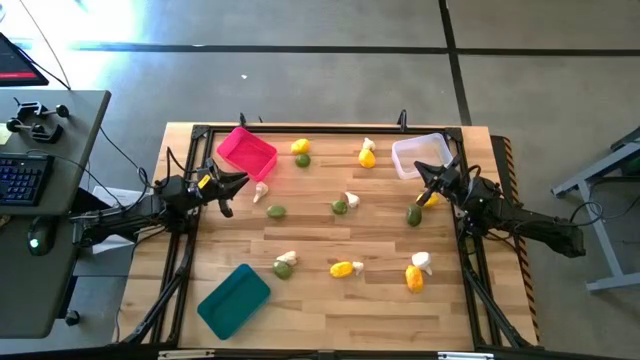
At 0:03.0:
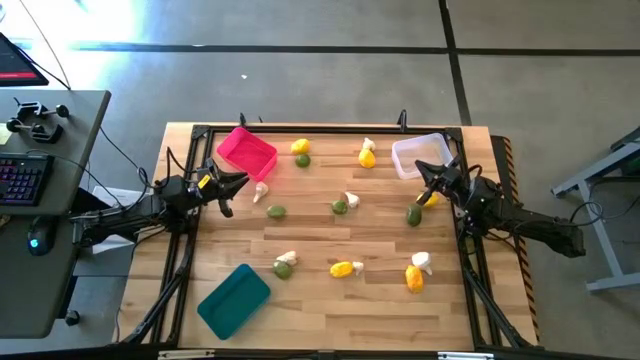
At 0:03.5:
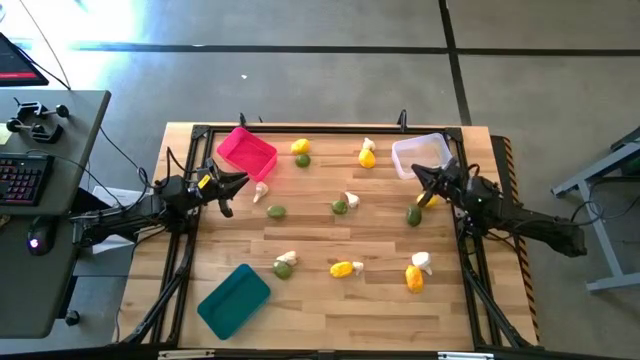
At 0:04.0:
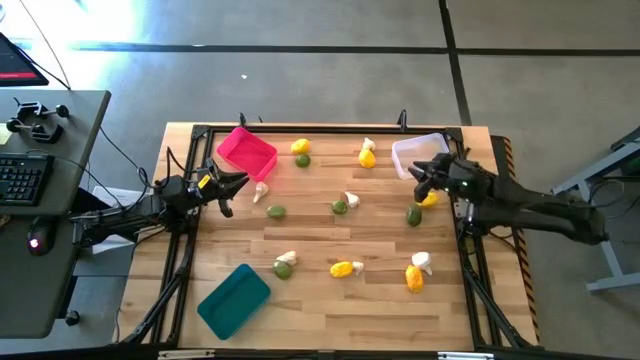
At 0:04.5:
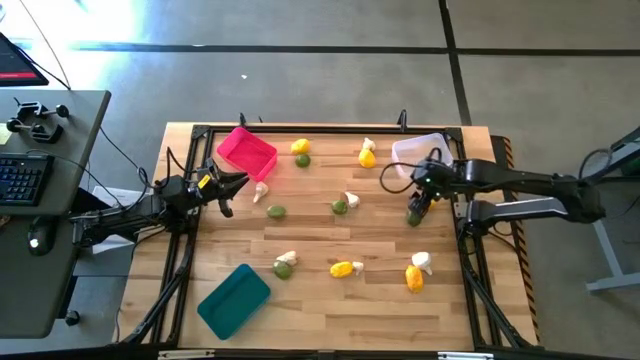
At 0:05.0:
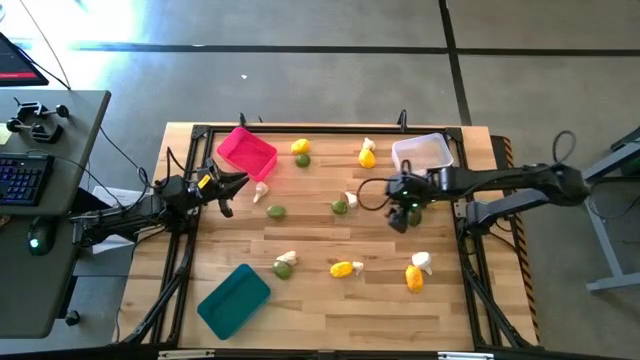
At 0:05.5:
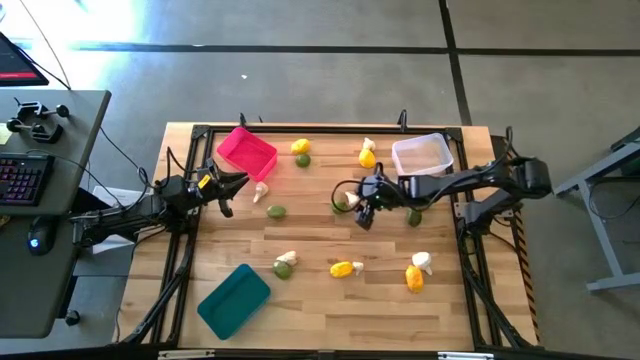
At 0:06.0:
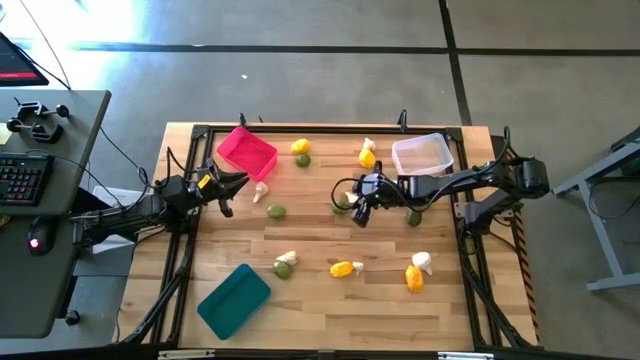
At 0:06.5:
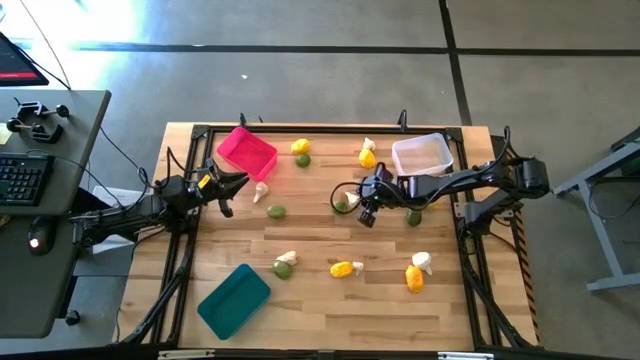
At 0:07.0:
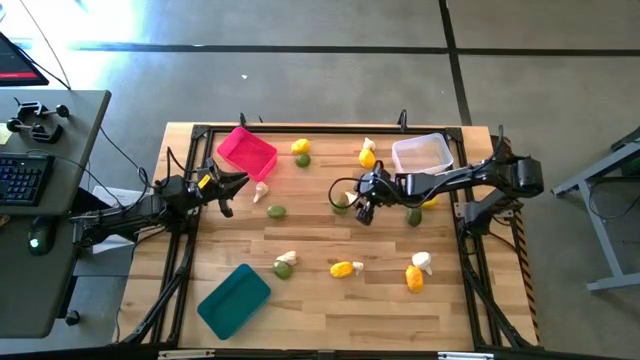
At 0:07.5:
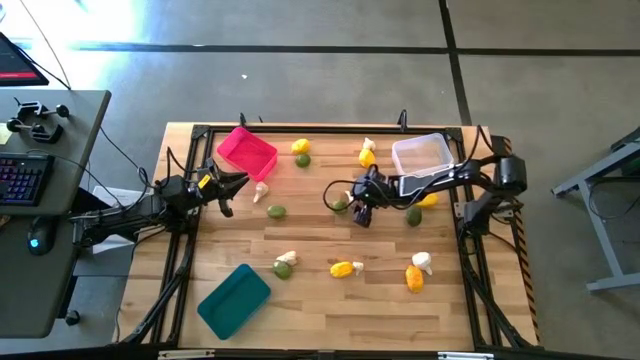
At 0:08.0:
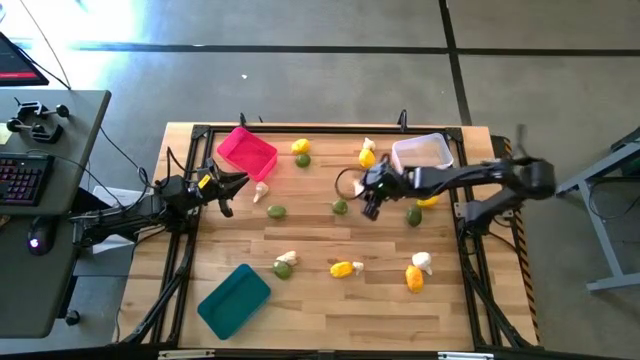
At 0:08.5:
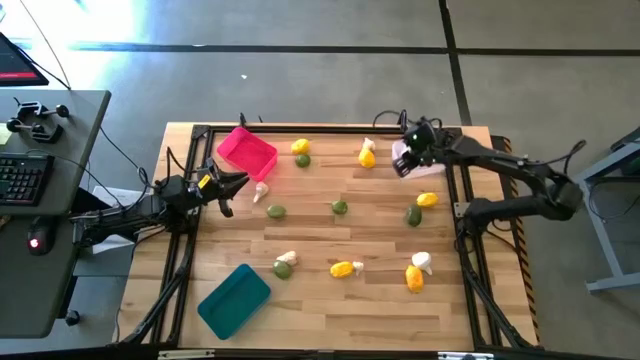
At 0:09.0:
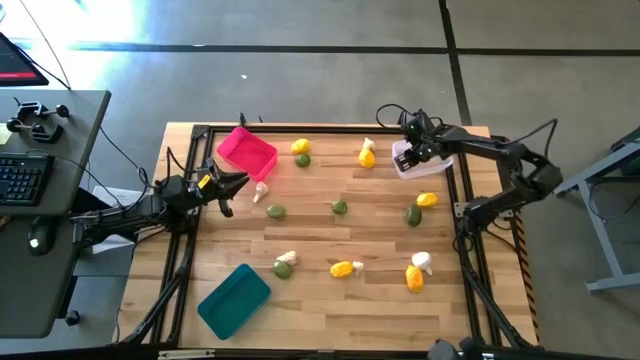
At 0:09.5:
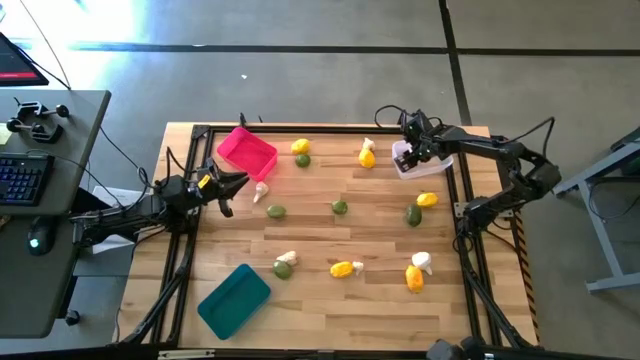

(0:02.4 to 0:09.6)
Task: Sort produce into baskets
Put the white garlic in the transparent bin

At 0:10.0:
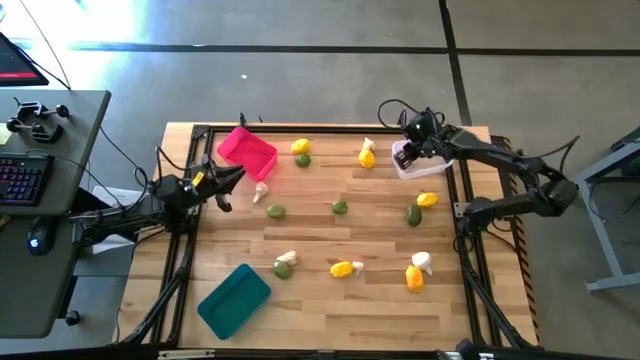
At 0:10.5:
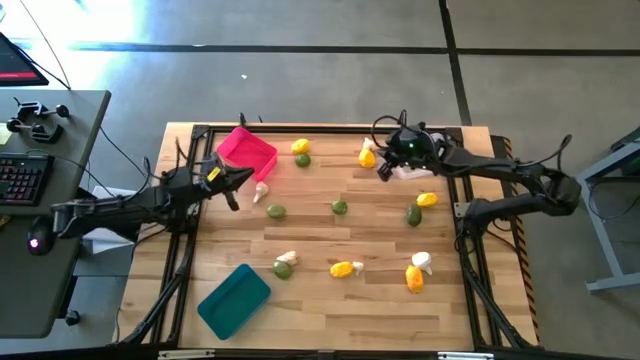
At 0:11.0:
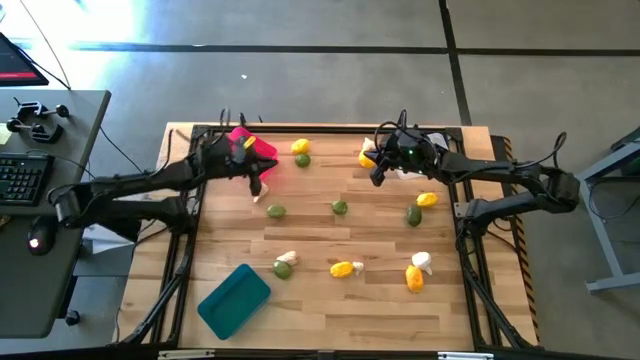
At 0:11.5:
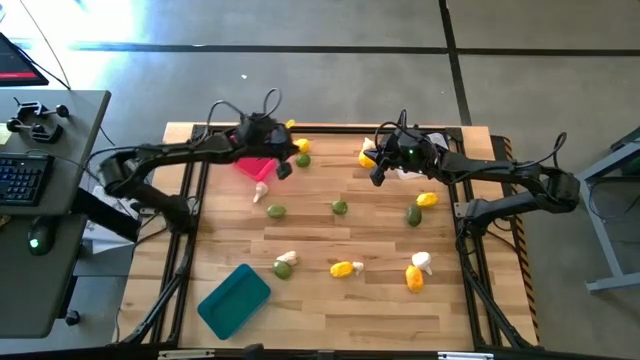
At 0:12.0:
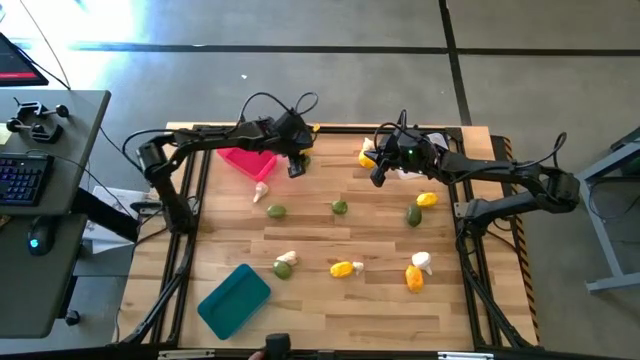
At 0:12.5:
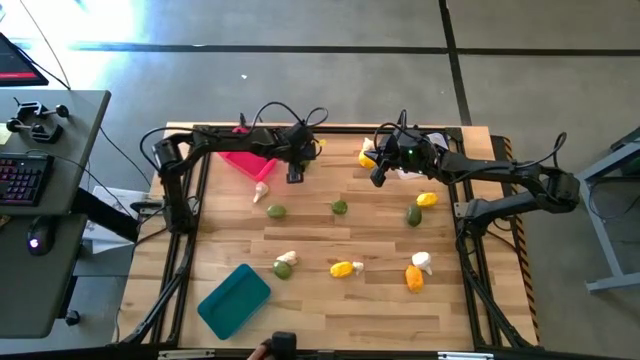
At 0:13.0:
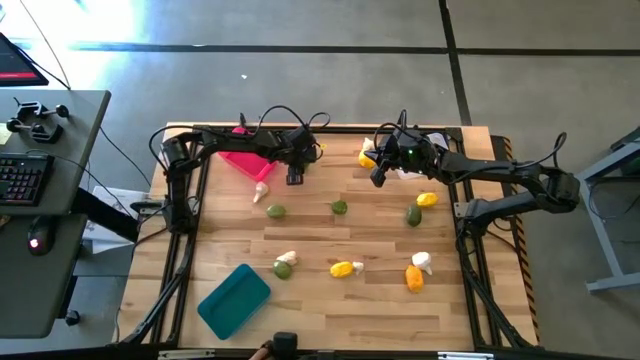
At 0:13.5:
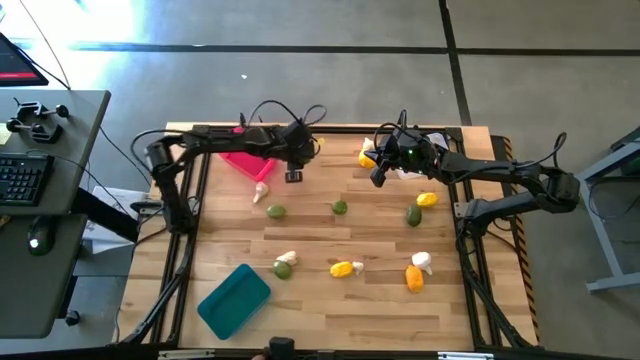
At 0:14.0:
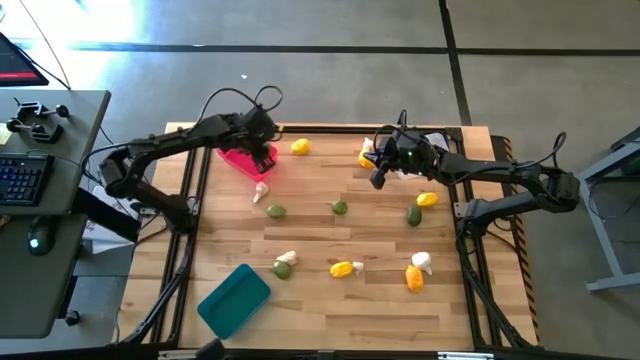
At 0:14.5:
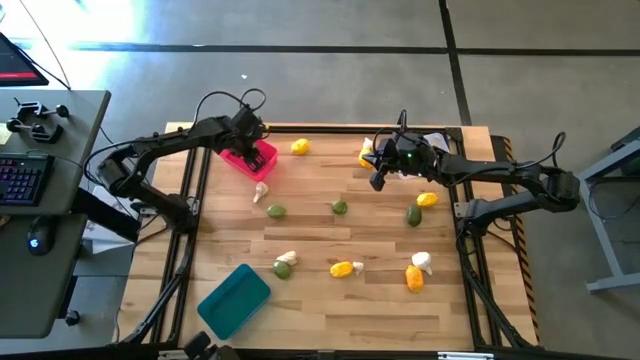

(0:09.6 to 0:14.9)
Put the green lime in the red bin

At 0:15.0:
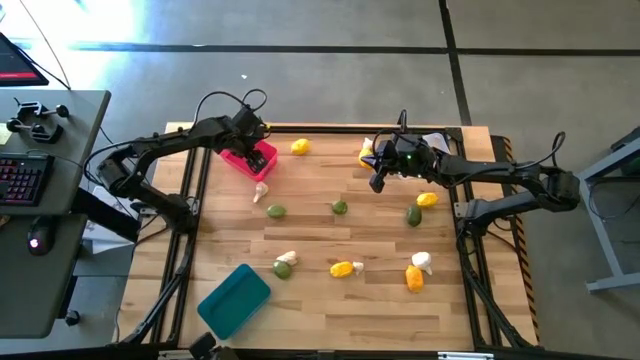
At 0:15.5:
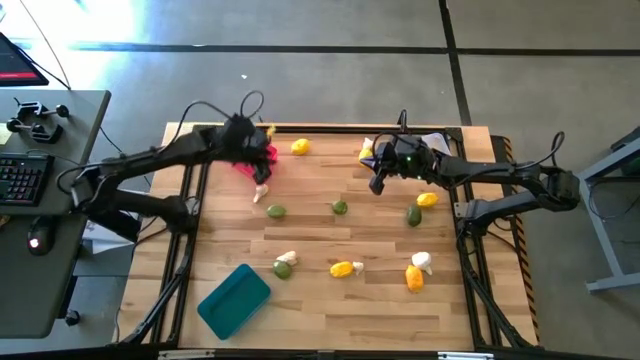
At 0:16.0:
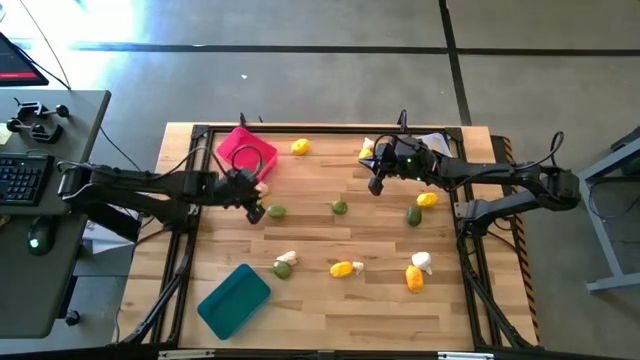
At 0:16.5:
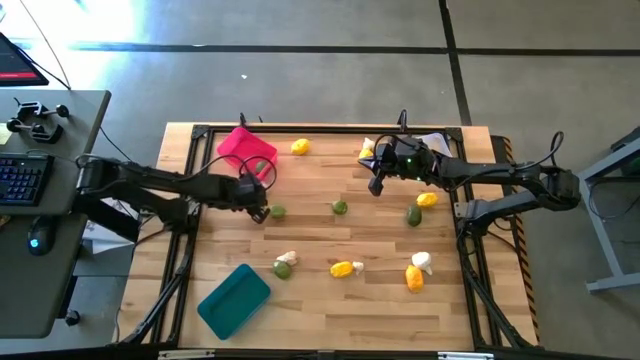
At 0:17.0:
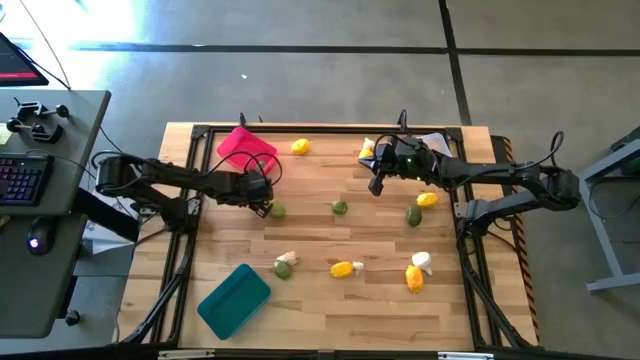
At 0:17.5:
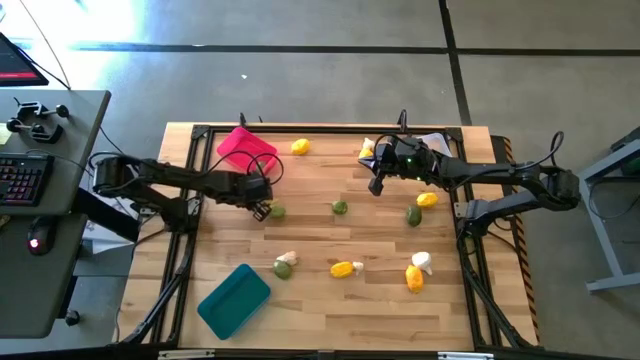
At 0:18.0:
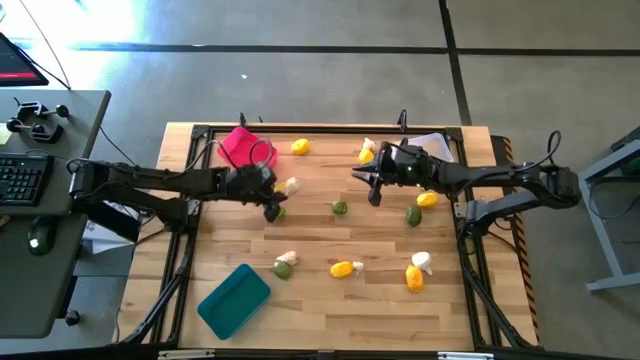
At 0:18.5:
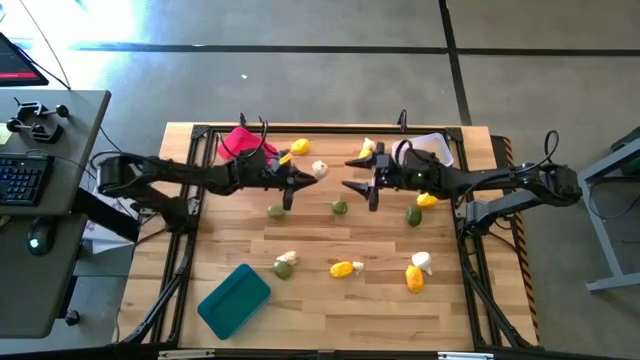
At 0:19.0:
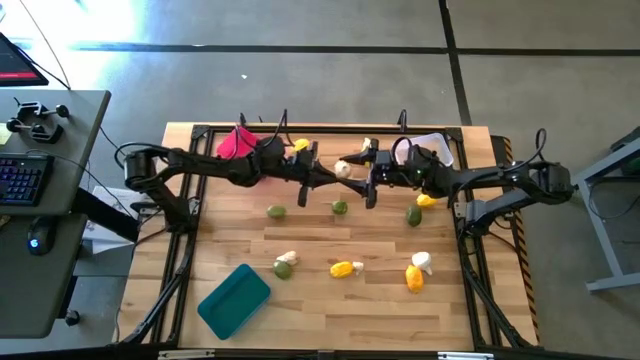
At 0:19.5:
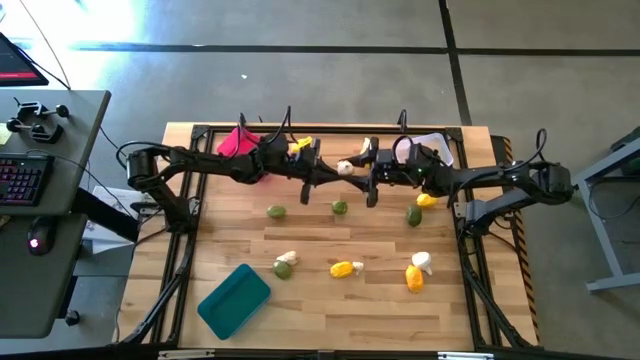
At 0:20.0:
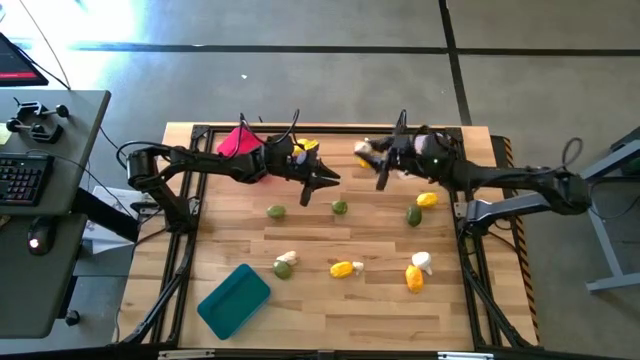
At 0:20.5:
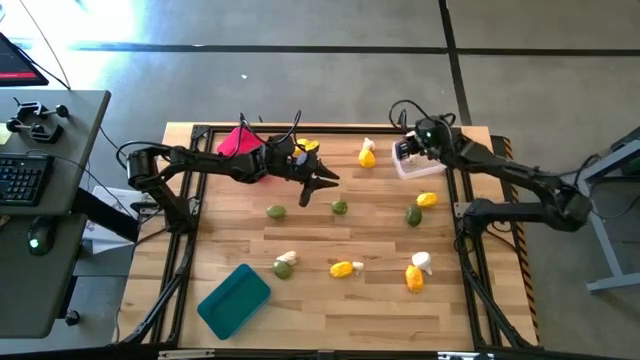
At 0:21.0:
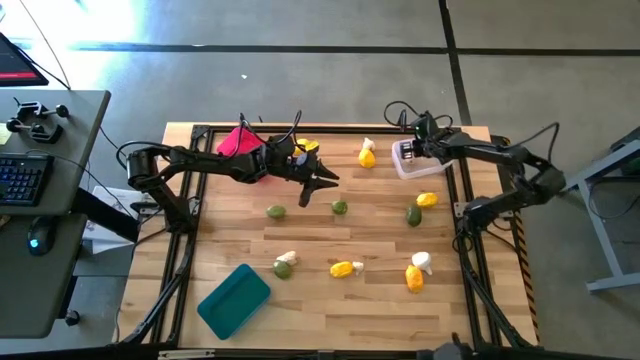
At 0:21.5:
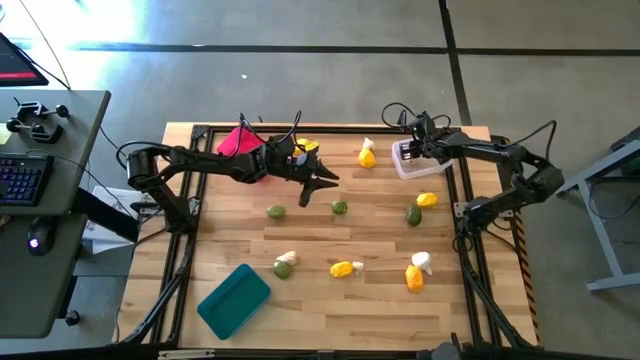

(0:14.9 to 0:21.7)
Put the white garlic in the transparent bin
